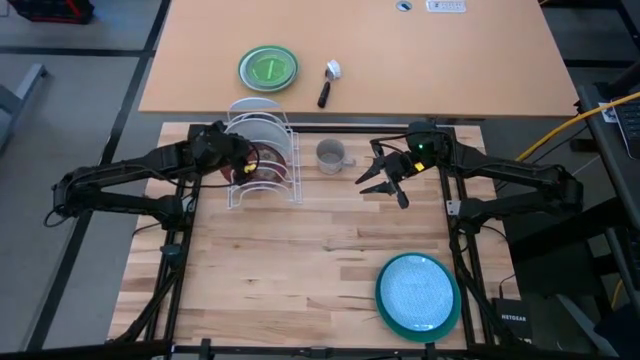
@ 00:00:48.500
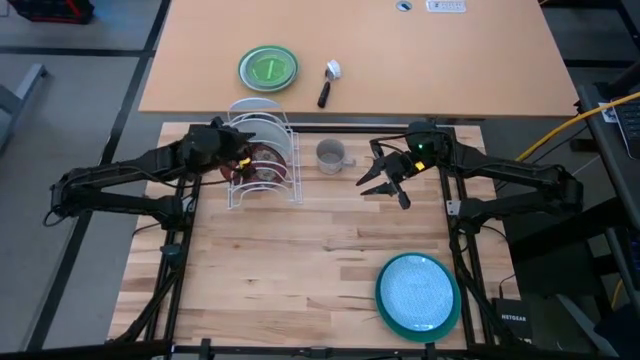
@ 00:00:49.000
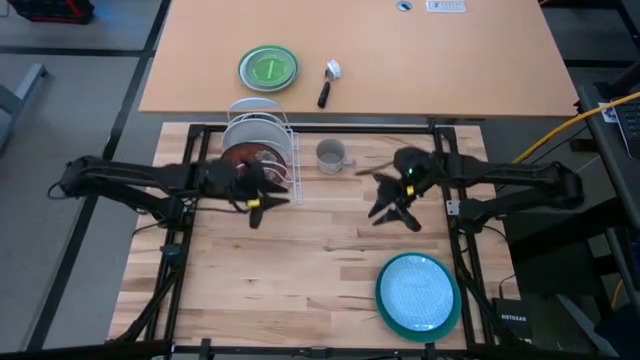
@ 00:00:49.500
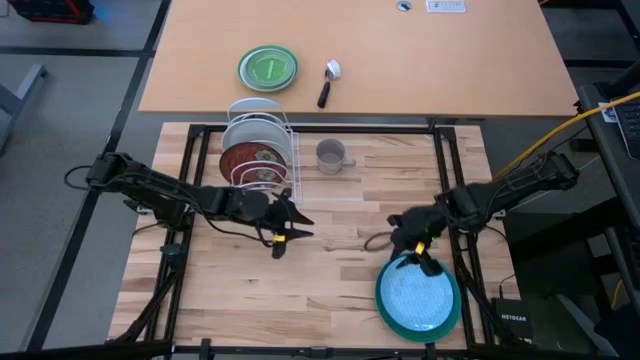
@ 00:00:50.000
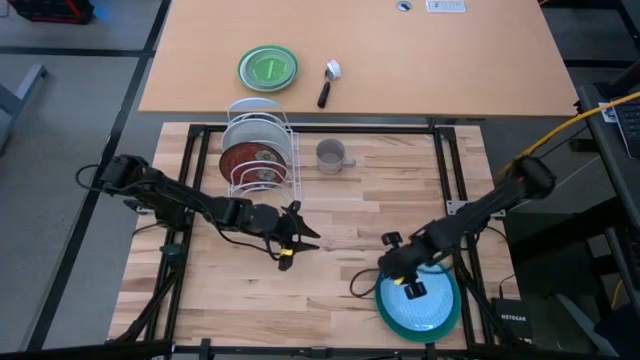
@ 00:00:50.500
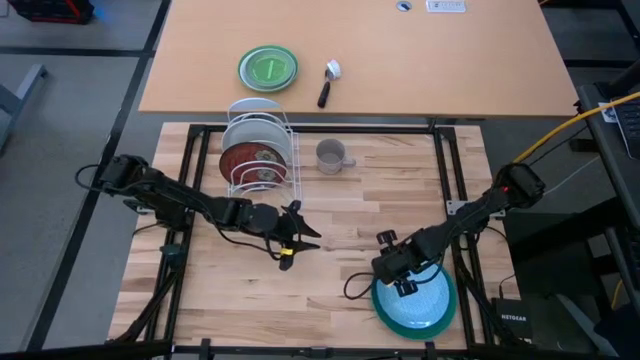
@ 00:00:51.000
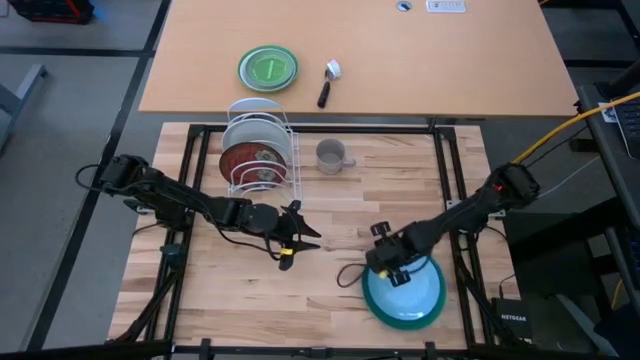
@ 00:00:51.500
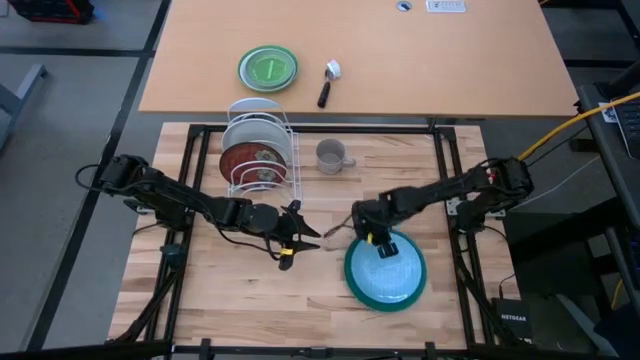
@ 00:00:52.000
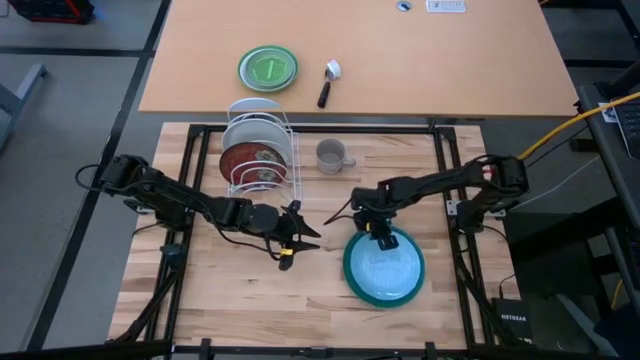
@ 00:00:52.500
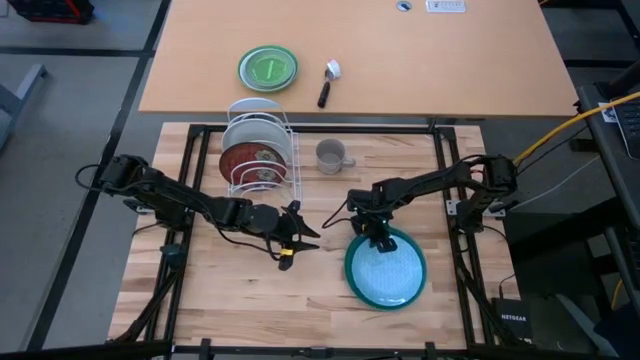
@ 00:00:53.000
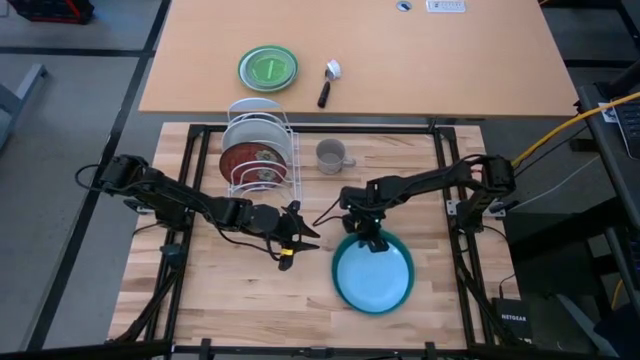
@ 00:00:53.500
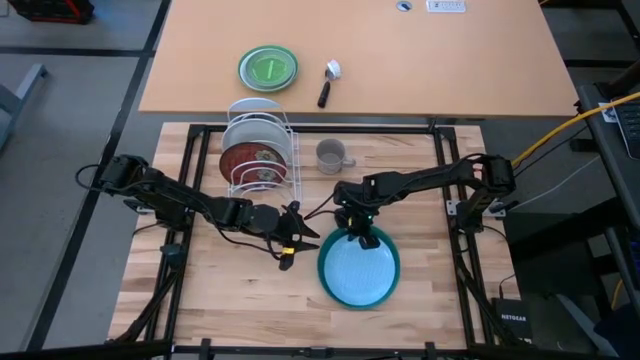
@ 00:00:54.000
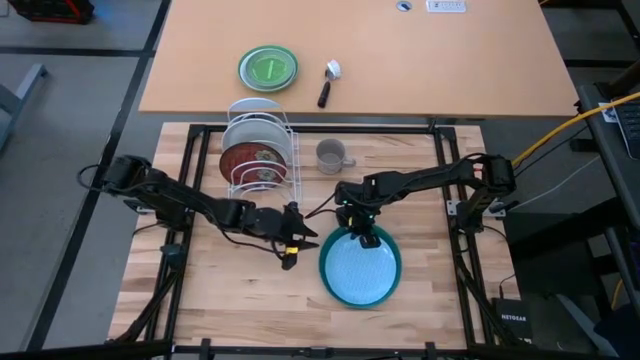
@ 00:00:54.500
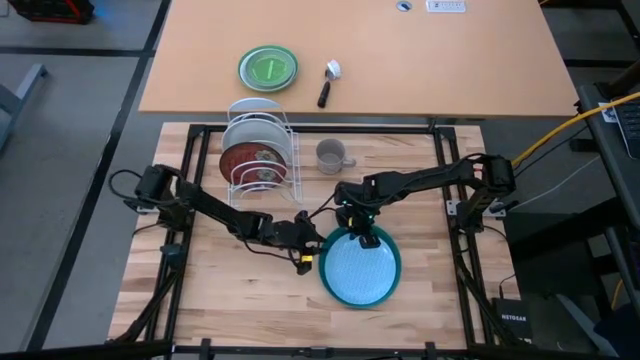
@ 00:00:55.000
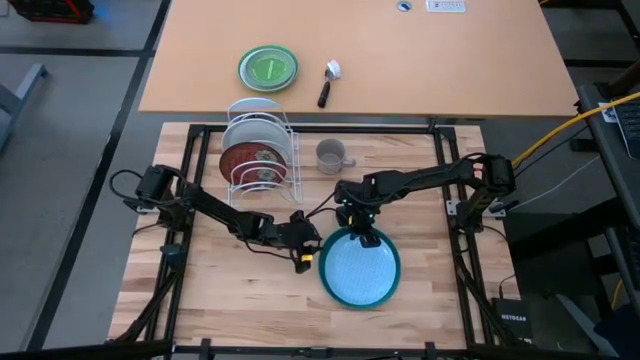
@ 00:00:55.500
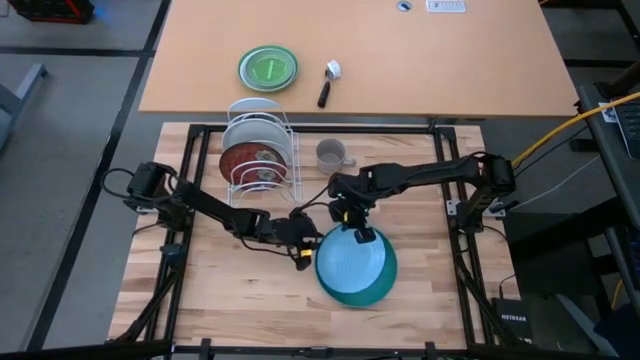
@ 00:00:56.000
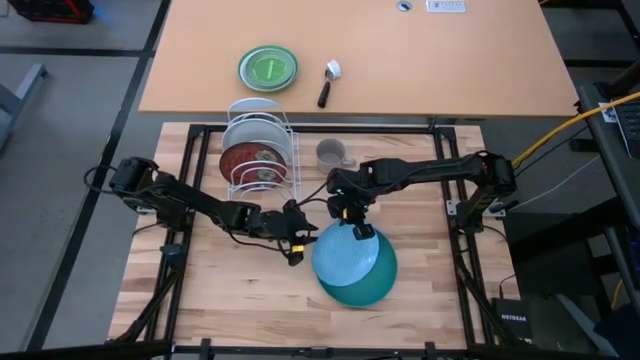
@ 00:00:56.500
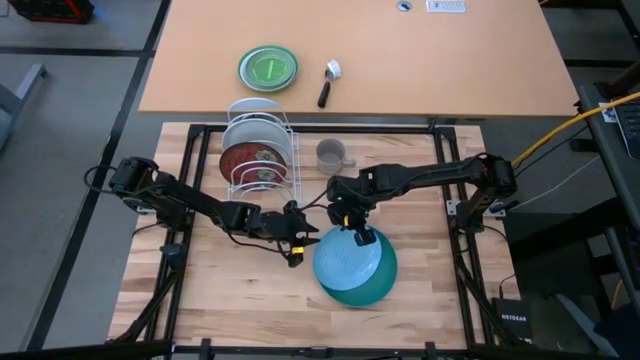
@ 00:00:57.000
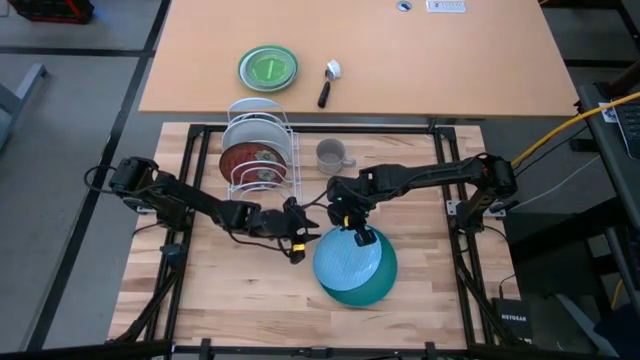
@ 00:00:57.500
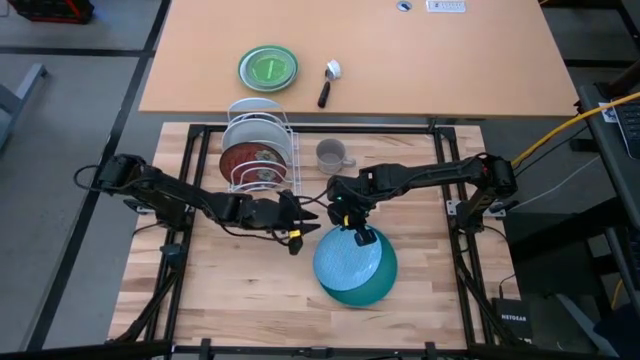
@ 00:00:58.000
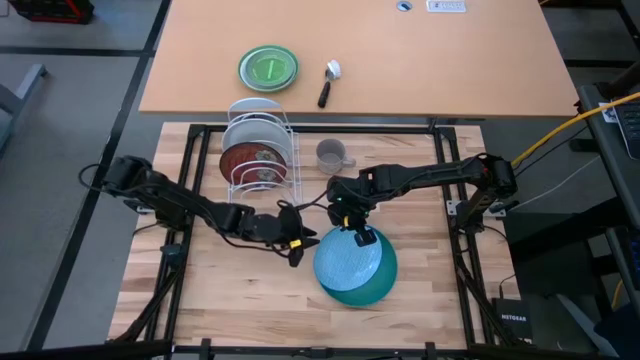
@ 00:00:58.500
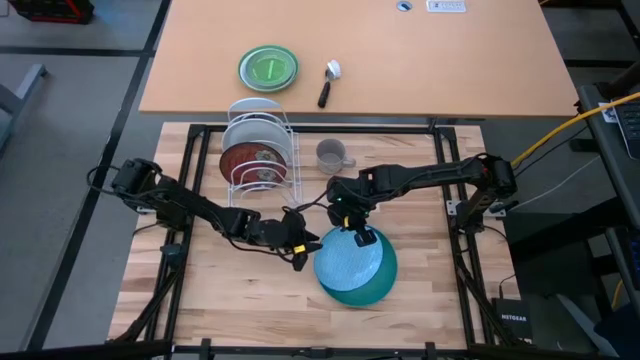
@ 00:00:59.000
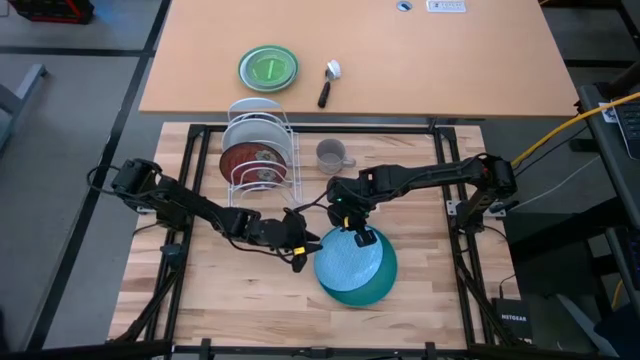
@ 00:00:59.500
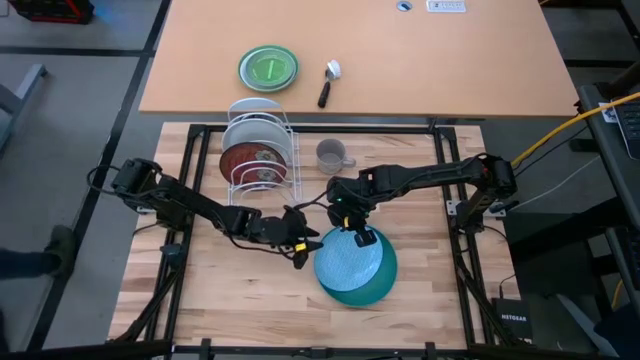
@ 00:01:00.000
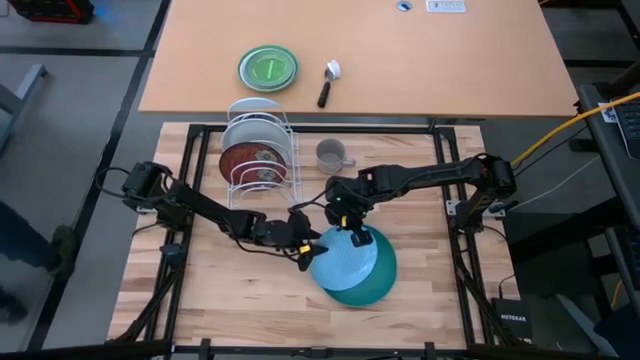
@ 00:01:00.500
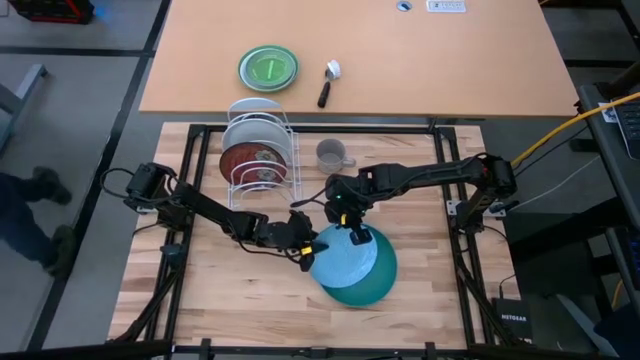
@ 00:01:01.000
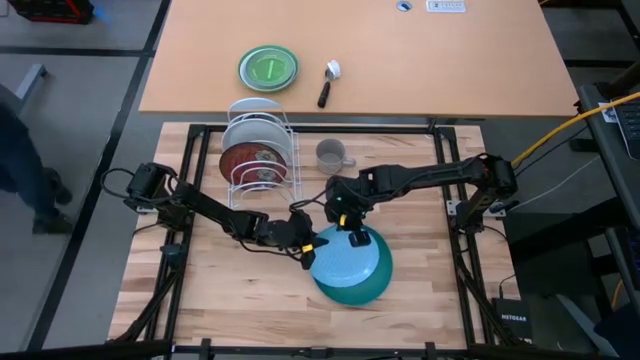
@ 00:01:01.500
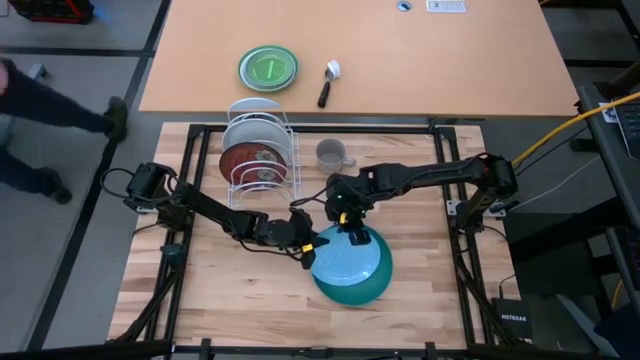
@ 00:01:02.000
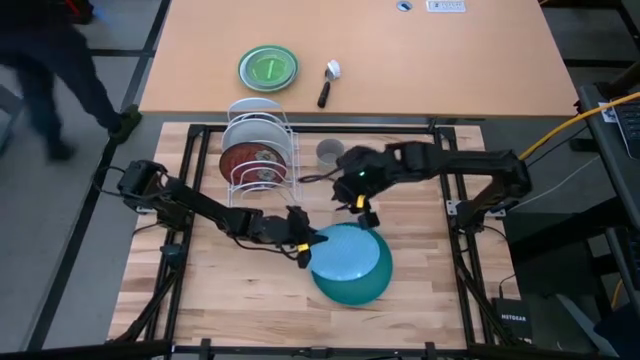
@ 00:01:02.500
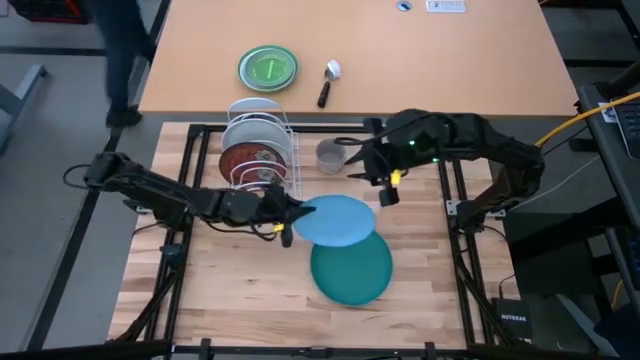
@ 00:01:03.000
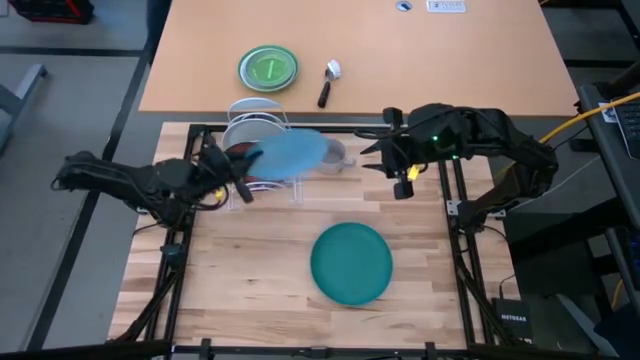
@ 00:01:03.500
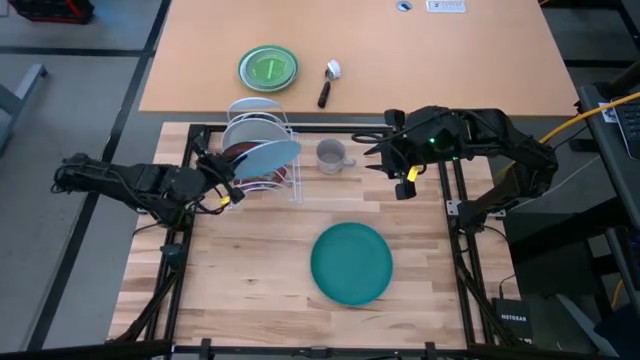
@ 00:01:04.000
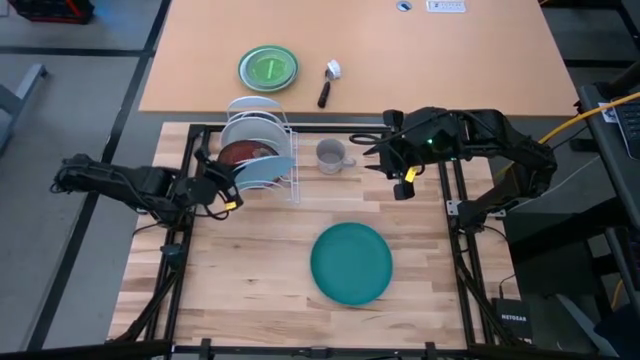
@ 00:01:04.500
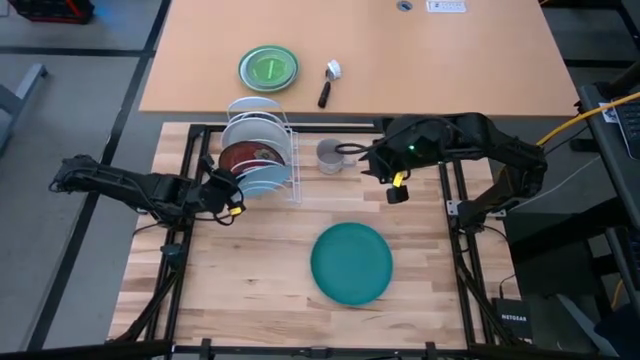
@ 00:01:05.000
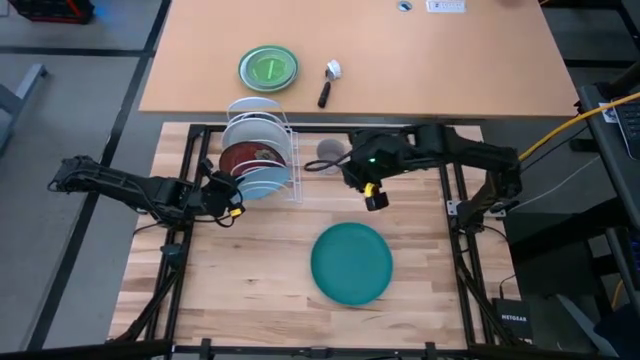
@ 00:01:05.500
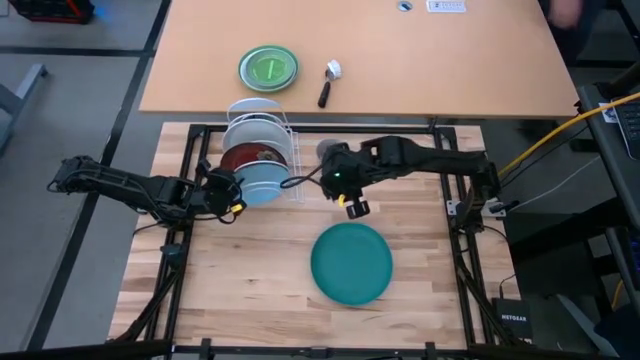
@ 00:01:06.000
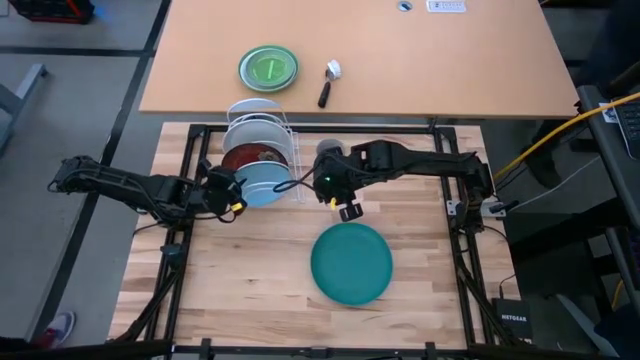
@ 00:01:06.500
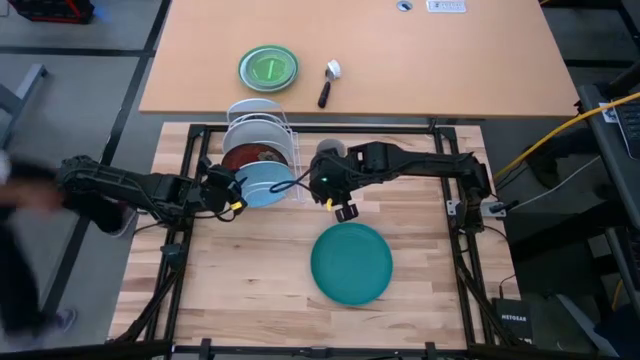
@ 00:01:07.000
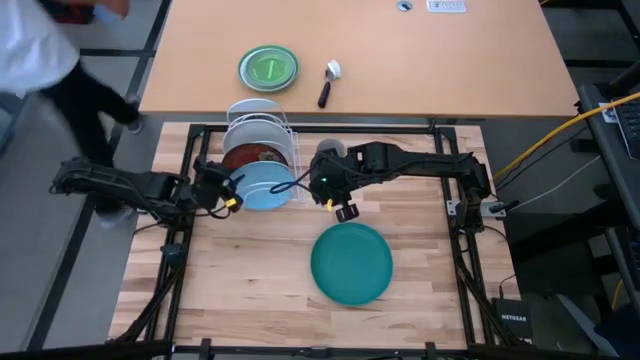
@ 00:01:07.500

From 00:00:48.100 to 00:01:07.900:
Task: Sort dishes
Put the blue plate into the dish rack

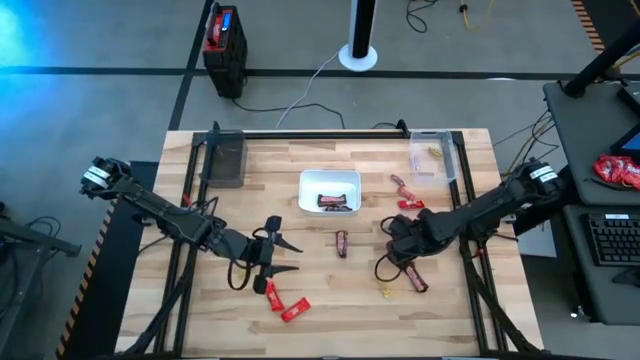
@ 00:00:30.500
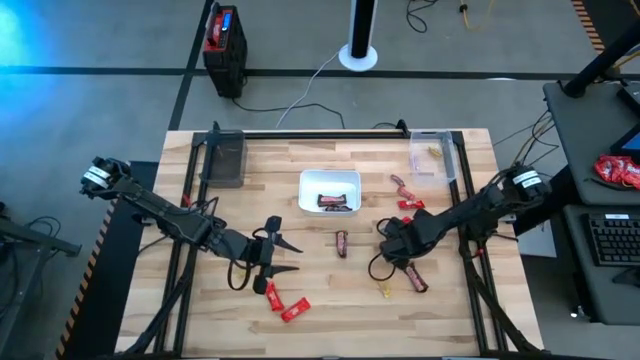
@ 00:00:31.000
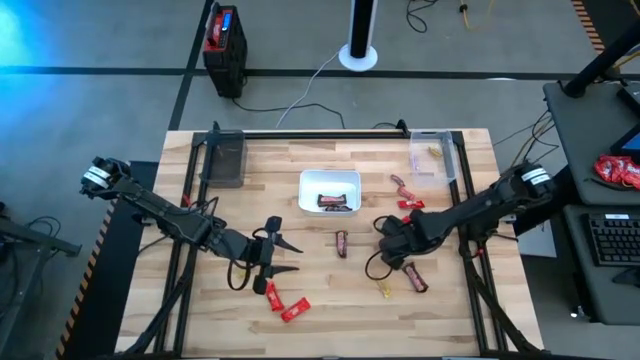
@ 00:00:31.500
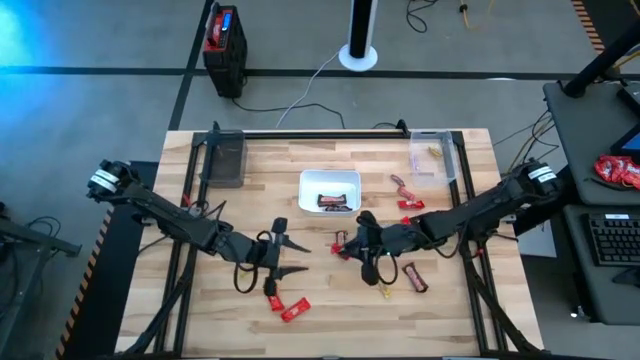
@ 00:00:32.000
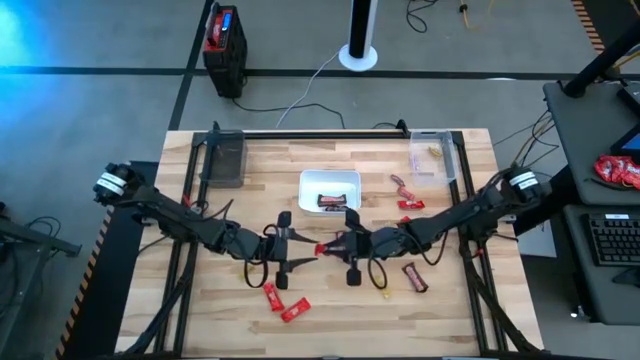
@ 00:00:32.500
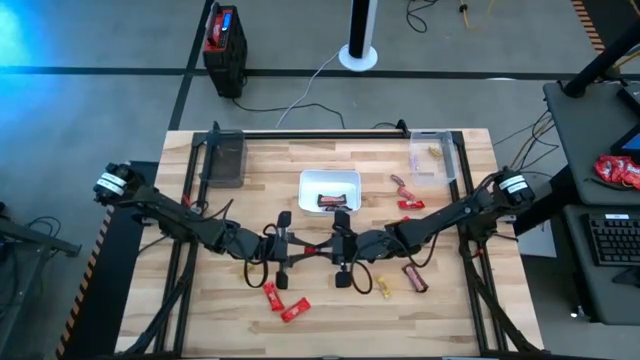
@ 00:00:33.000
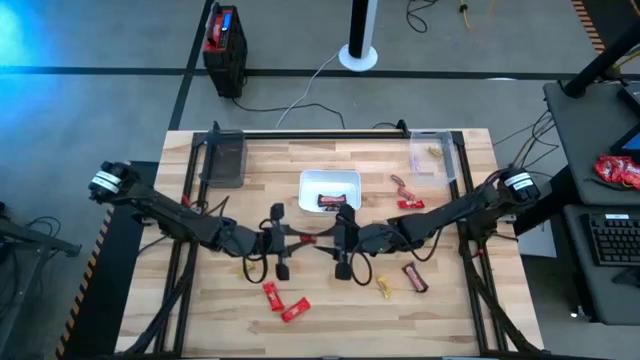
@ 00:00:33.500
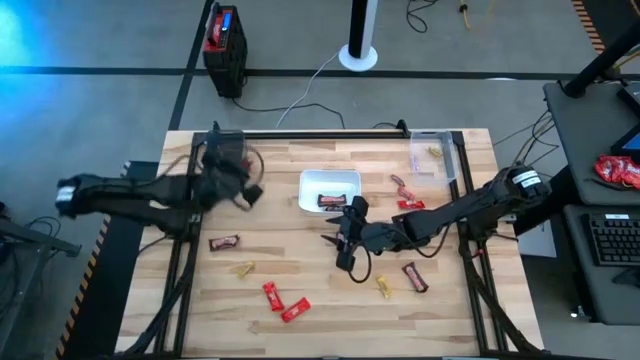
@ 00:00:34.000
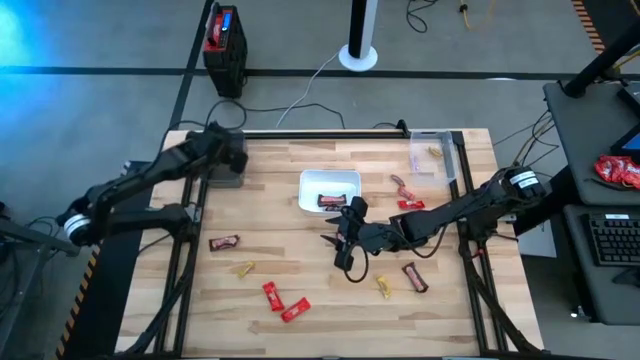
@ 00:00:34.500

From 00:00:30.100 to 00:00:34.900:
Task: Sort candy by brand, put in halloween buckets
Put the red chocolate bar into the black bin
